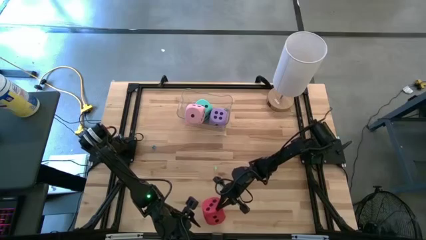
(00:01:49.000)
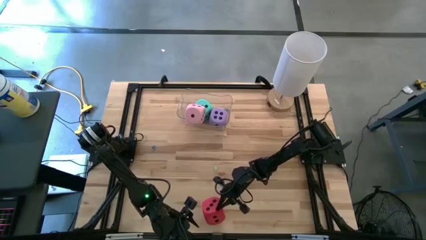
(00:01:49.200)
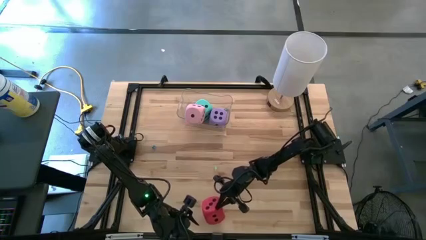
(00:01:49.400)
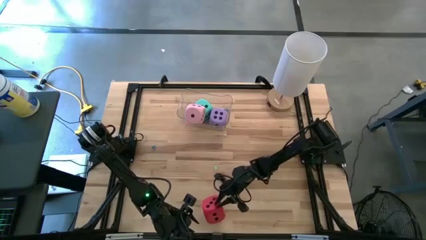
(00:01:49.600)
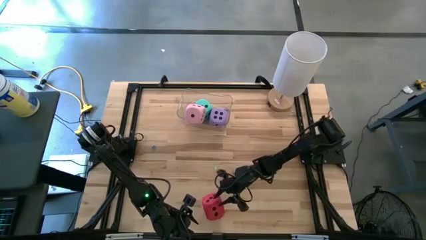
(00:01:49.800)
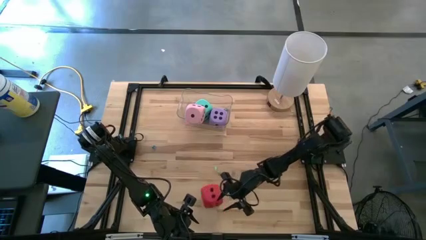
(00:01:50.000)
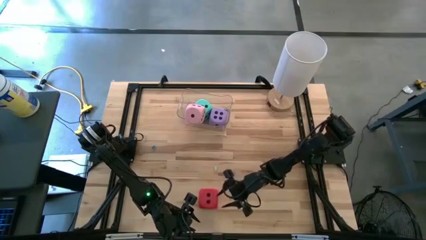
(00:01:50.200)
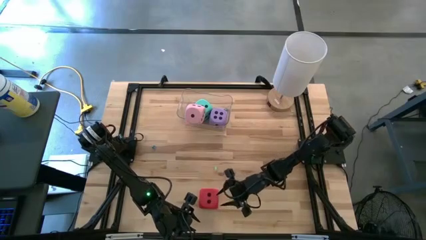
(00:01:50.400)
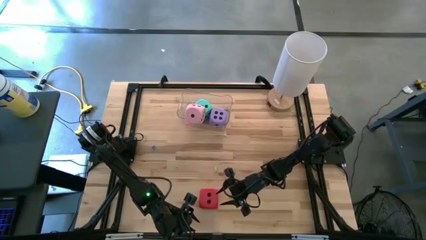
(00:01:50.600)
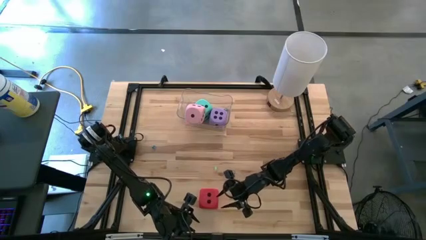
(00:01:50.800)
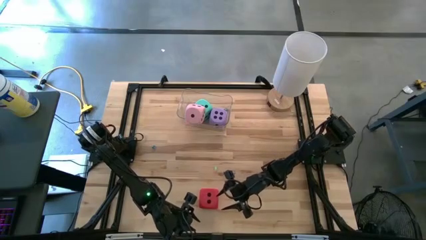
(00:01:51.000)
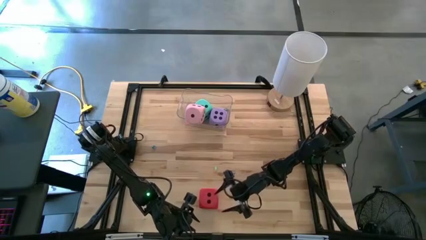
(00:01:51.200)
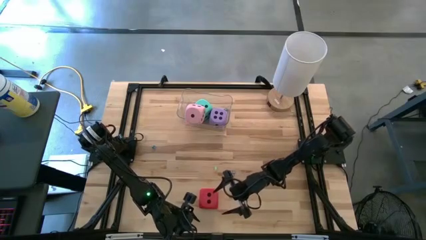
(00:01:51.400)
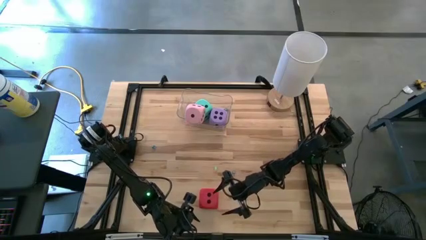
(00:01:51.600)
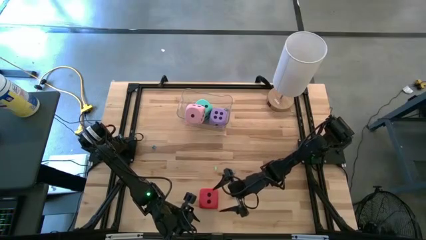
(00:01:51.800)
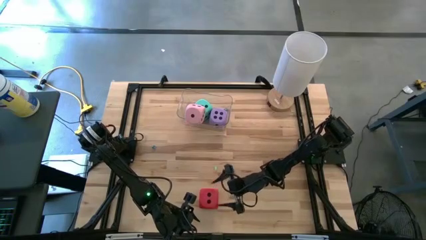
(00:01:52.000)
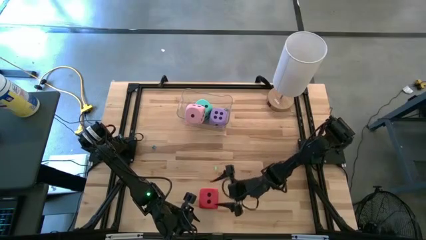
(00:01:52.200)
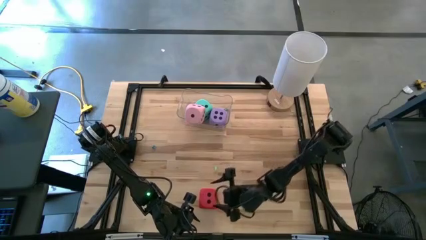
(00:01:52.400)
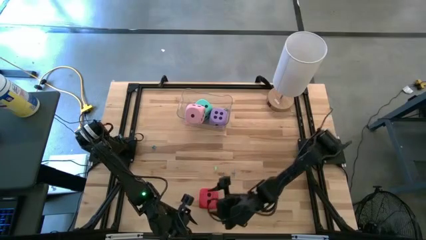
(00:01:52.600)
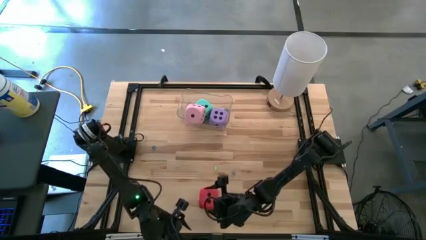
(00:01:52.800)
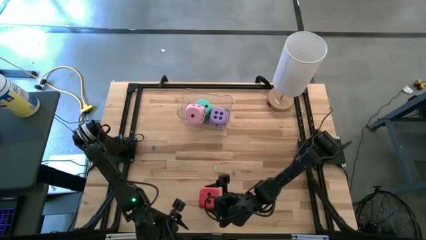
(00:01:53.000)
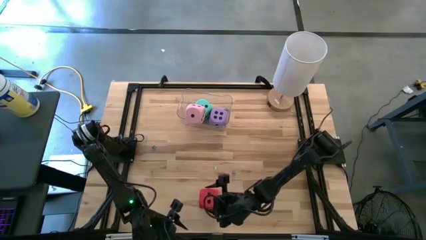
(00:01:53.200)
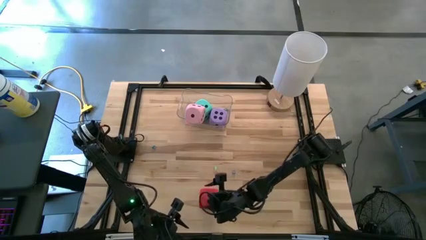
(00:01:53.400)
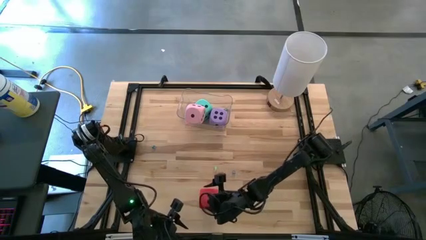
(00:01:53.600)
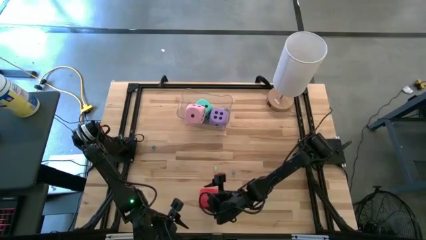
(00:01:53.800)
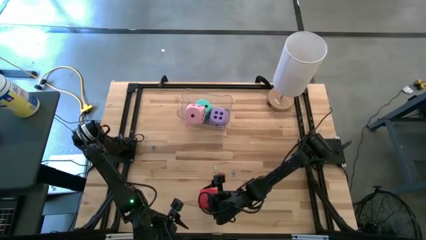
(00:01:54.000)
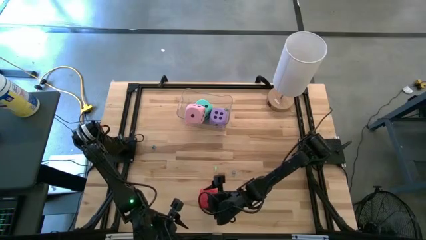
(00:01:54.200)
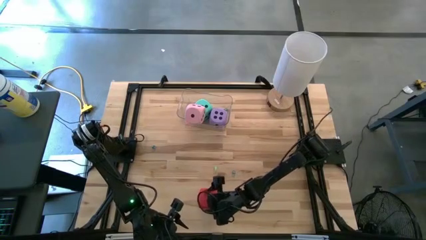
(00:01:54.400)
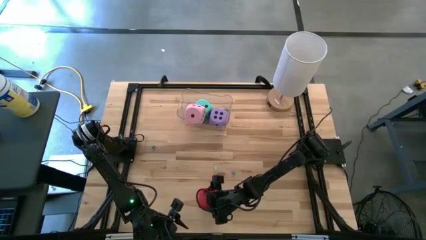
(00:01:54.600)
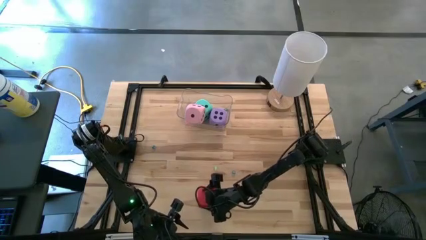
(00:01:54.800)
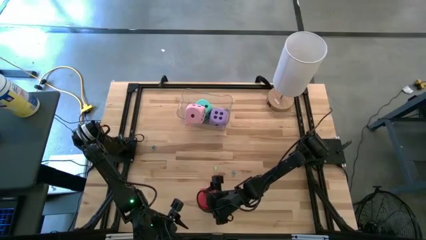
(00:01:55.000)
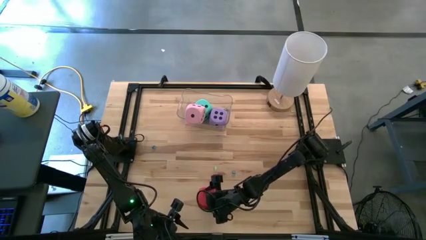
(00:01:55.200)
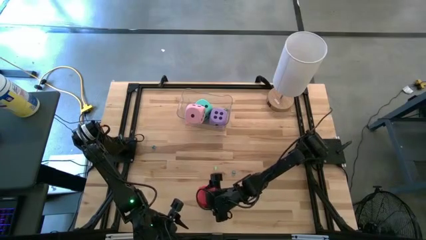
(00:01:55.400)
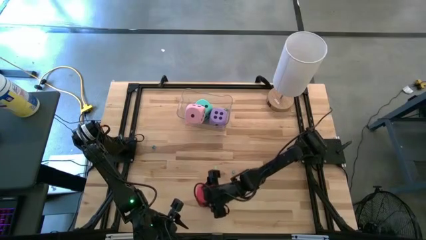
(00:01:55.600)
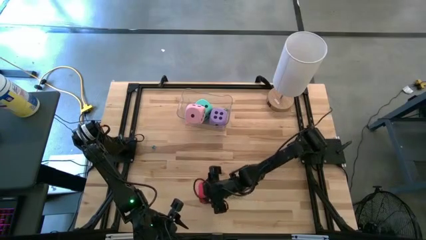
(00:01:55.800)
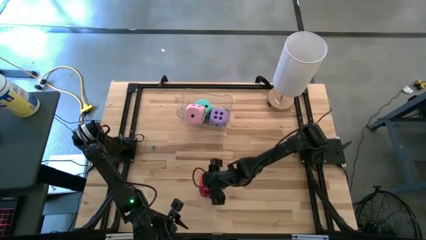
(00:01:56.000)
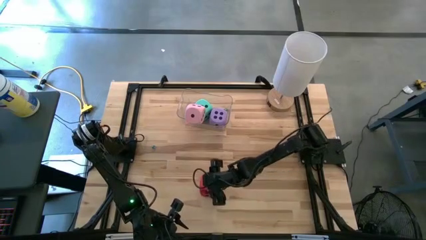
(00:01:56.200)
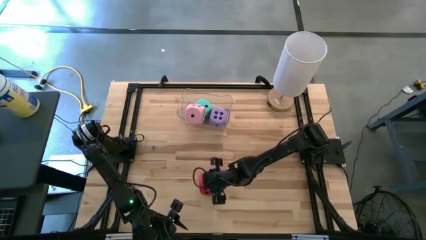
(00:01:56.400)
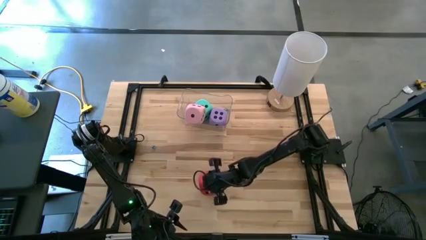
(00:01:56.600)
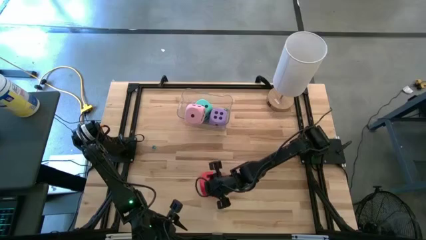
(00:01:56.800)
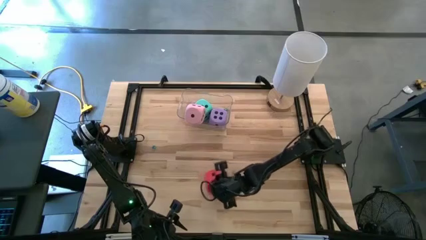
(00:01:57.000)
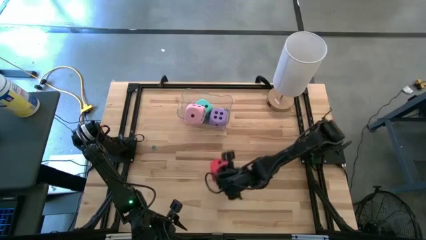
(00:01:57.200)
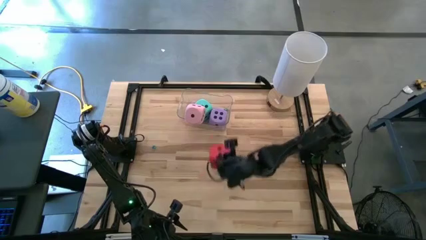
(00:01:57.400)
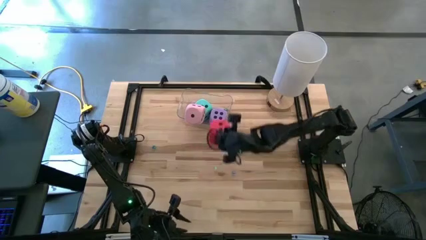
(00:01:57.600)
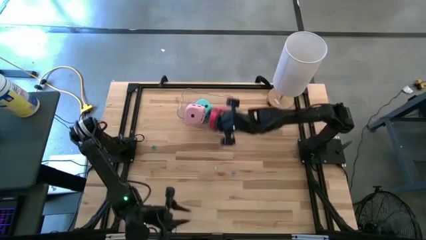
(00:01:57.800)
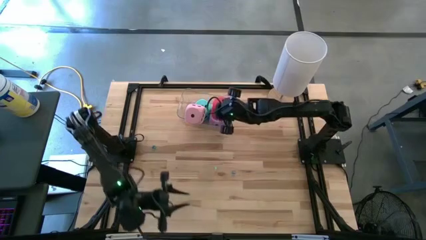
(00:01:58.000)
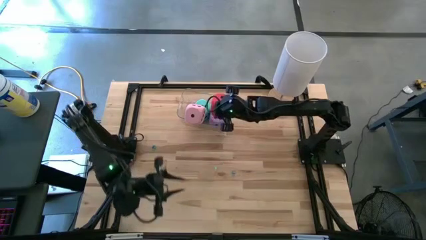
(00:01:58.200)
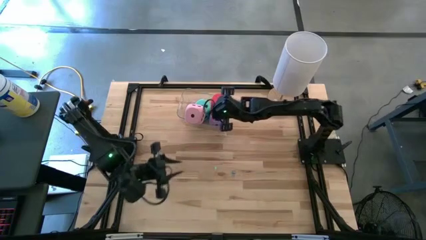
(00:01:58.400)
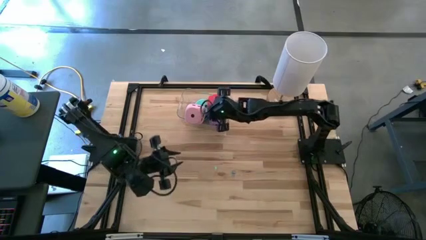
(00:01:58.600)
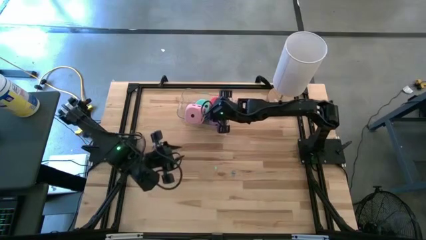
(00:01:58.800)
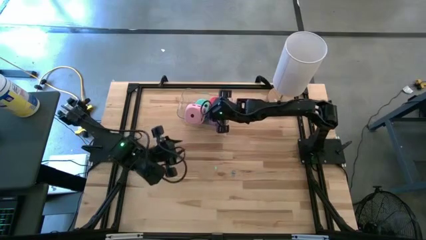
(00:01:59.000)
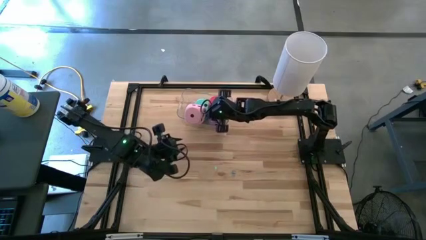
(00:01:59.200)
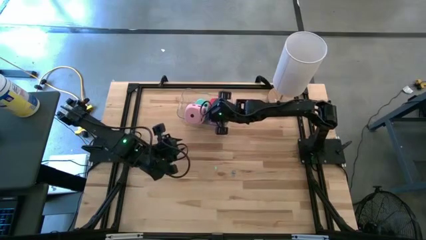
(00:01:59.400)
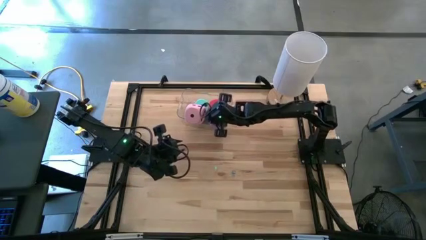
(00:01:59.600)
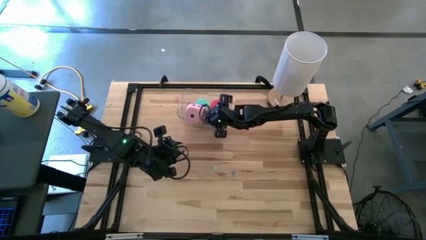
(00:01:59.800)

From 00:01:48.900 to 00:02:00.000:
Task: Pick & Place Dice
Put the large red dice into the transparent bin
